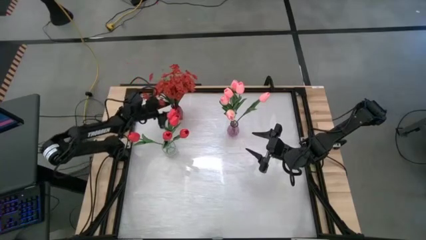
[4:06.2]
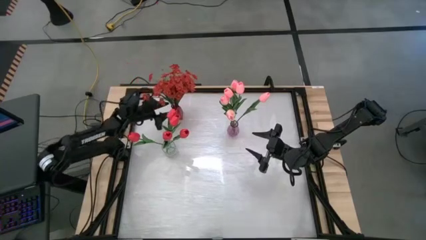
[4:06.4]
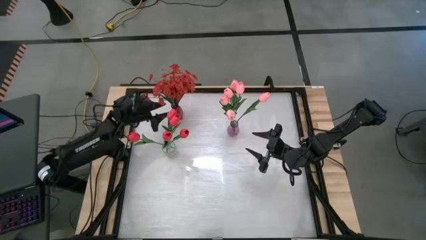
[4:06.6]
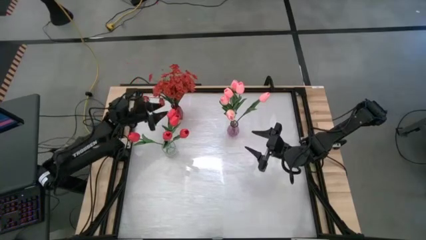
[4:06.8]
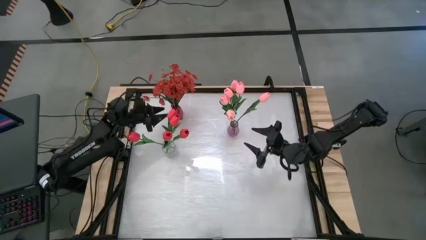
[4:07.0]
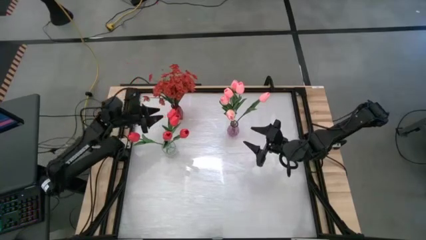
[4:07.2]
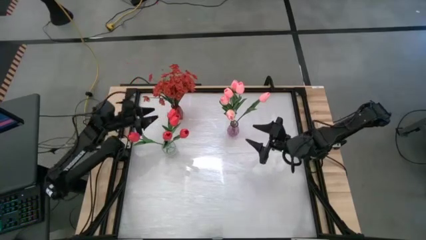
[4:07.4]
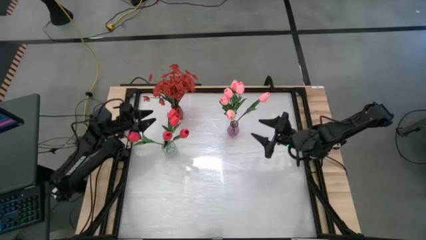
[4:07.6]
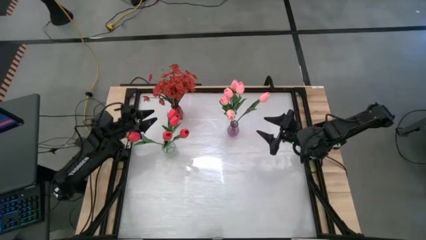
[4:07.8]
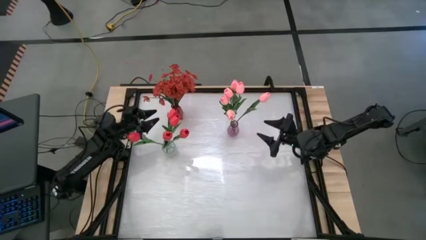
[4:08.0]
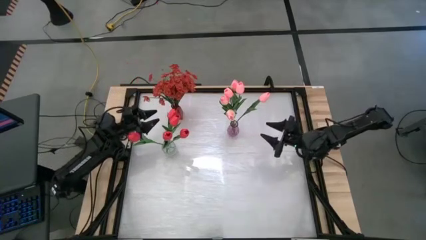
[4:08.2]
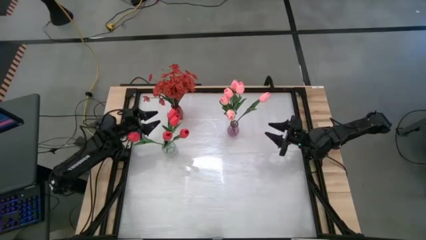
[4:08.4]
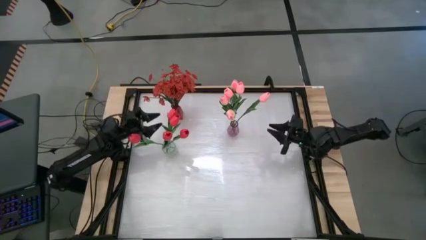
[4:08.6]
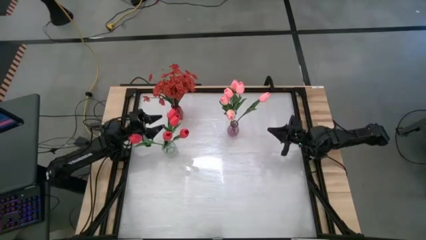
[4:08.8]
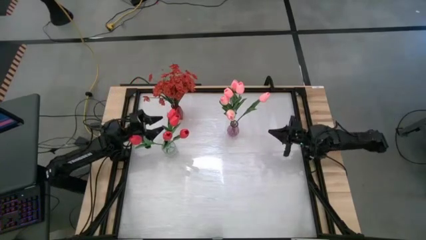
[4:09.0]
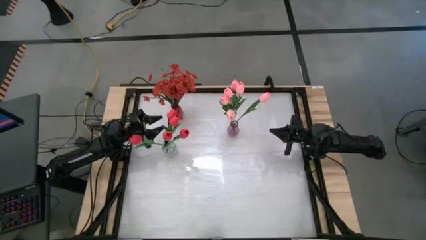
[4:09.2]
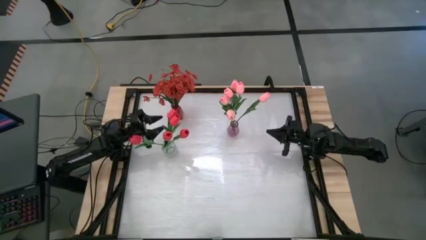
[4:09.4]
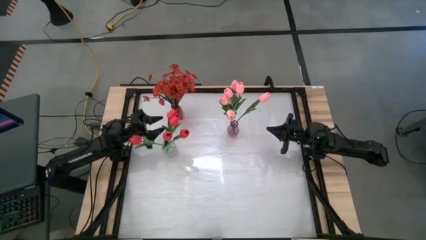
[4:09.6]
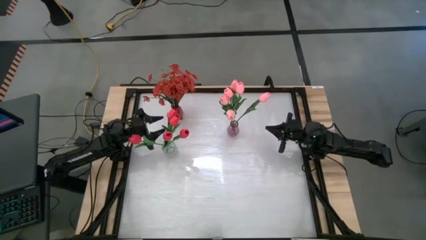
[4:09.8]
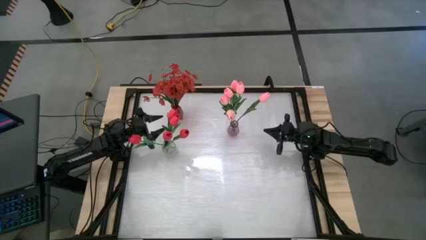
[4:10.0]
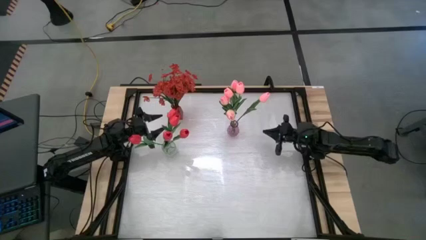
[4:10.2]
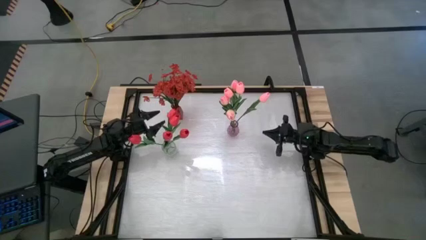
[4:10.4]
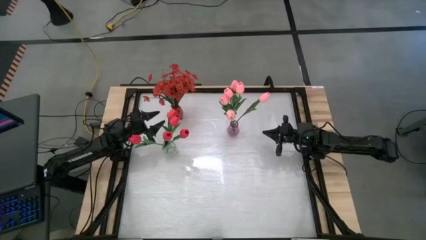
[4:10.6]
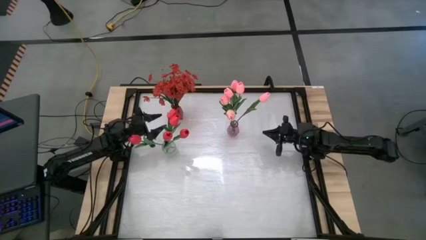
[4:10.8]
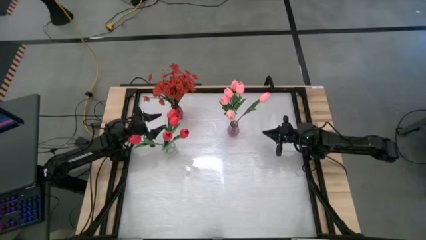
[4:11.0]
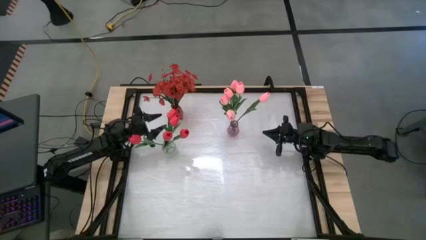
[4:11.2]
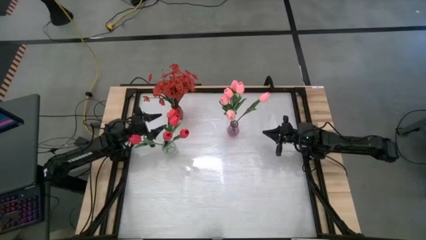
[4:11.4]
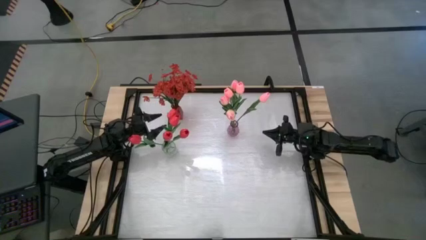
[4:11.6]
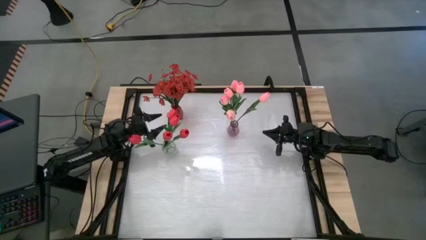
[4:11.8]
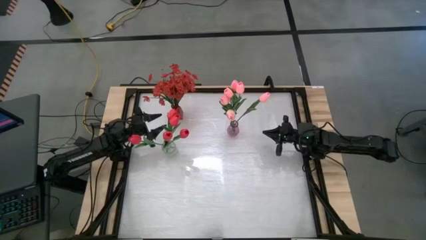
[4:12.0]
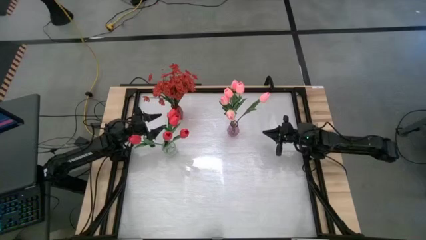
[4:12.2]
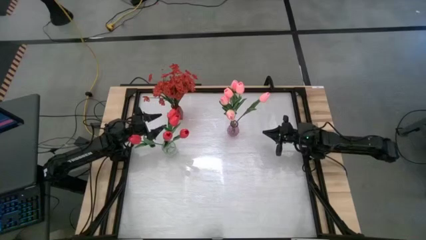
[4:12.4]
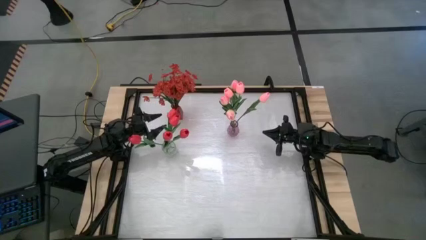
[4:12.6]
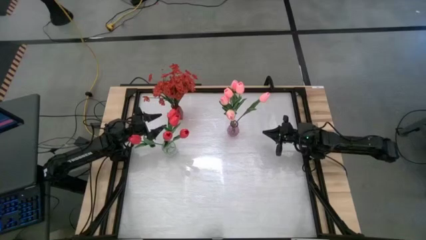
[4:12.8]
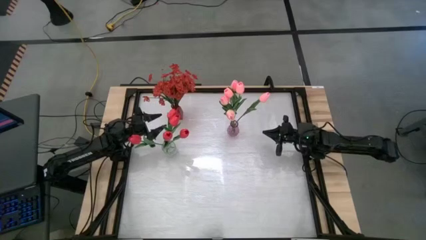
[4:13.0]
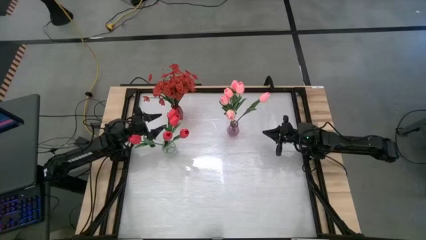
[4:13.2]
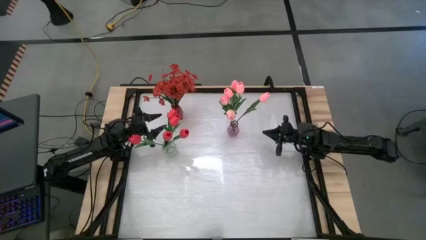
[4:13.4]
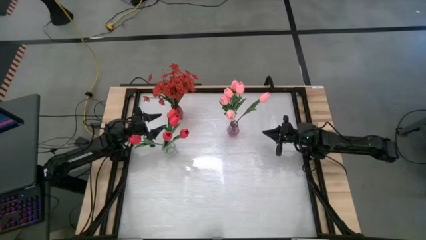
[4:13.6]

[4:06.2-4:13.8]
Task: Sort flowers into vase by color
Return to Home Position

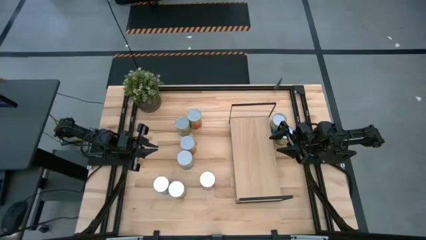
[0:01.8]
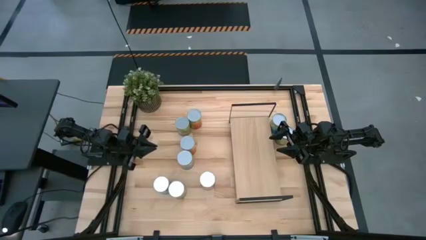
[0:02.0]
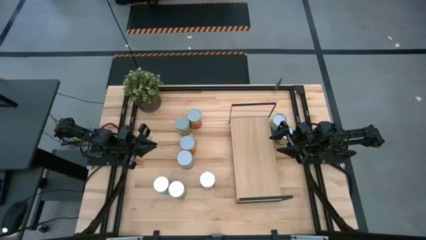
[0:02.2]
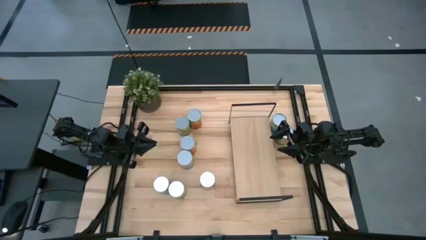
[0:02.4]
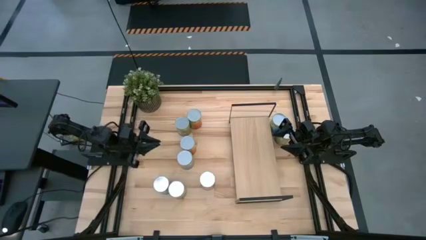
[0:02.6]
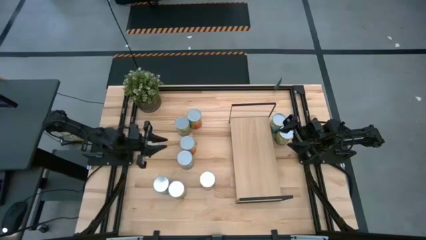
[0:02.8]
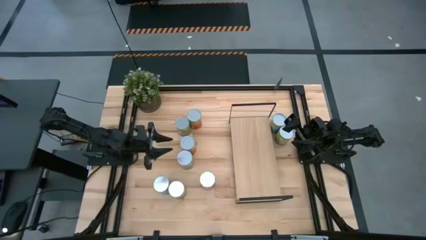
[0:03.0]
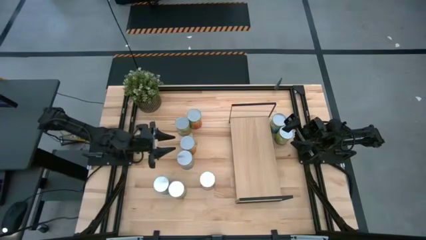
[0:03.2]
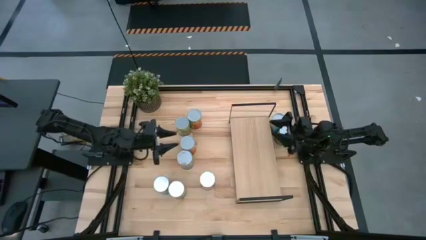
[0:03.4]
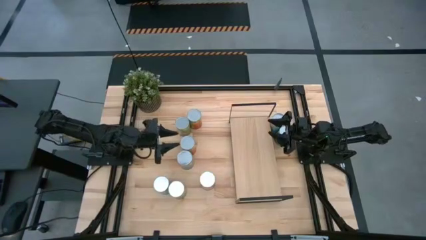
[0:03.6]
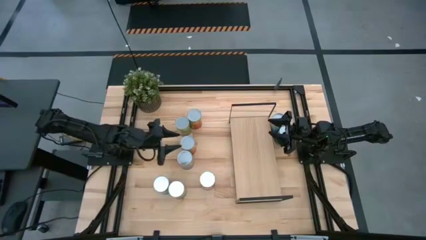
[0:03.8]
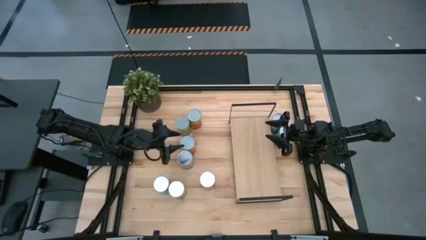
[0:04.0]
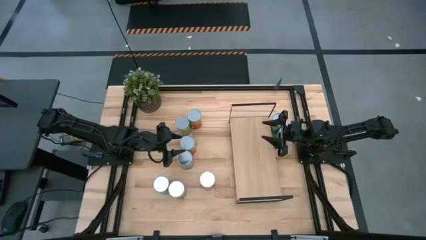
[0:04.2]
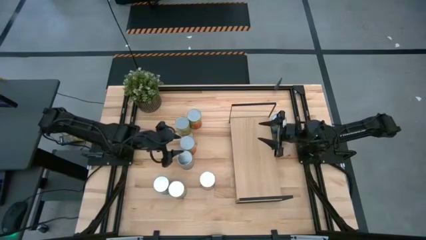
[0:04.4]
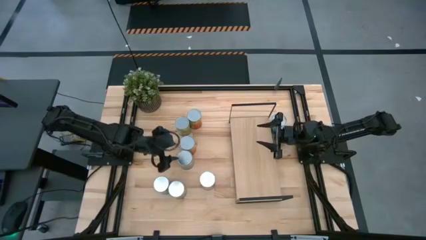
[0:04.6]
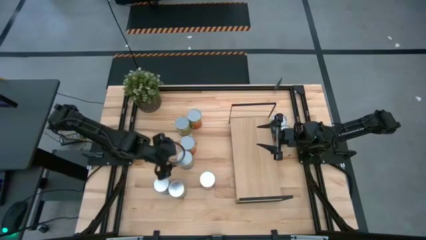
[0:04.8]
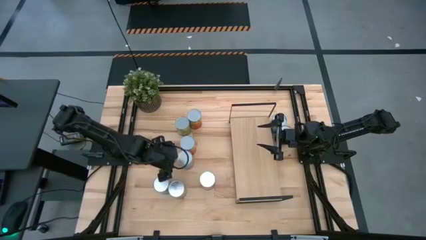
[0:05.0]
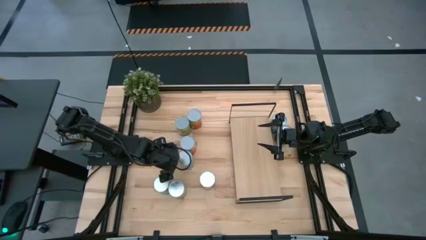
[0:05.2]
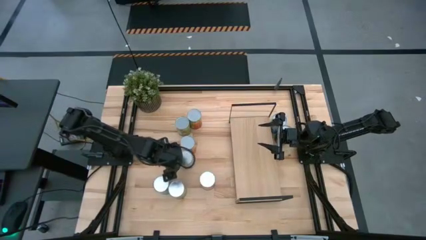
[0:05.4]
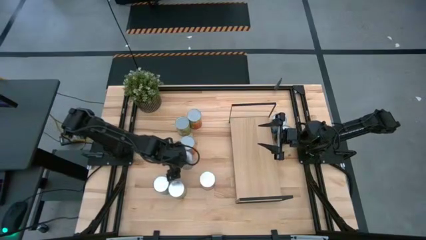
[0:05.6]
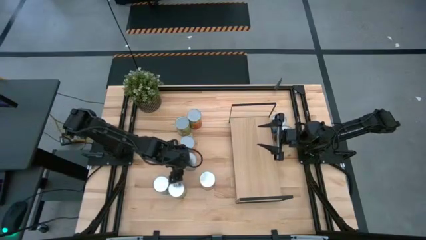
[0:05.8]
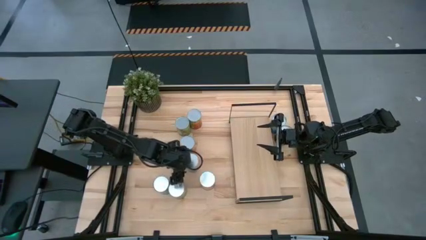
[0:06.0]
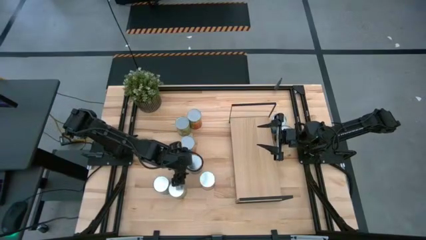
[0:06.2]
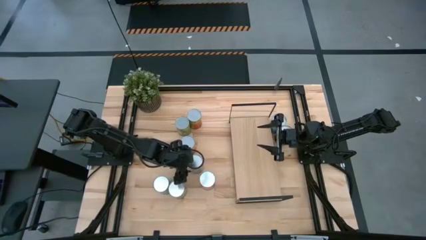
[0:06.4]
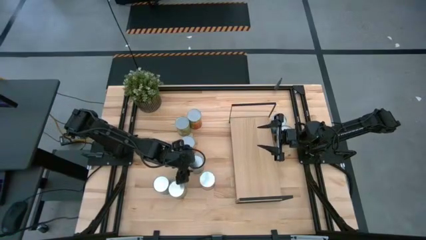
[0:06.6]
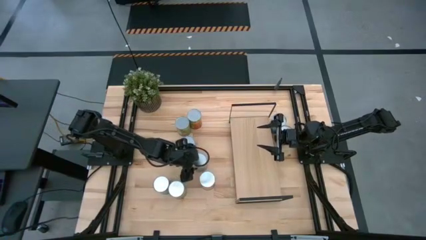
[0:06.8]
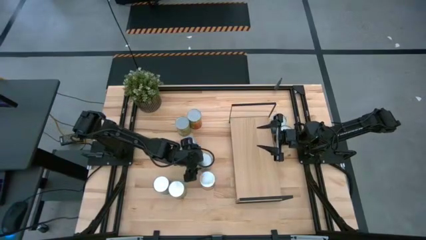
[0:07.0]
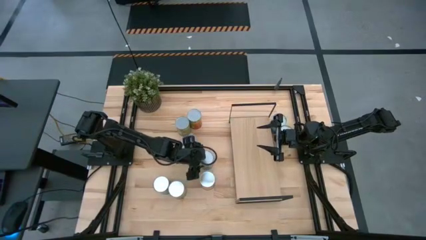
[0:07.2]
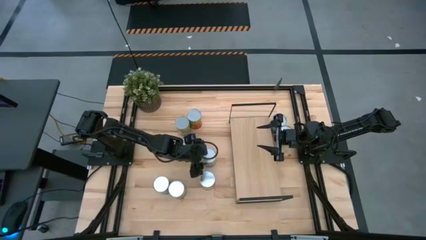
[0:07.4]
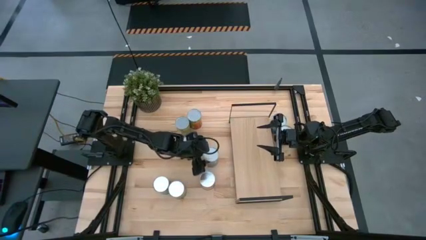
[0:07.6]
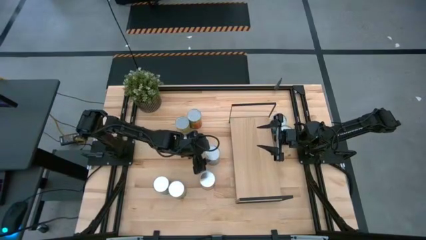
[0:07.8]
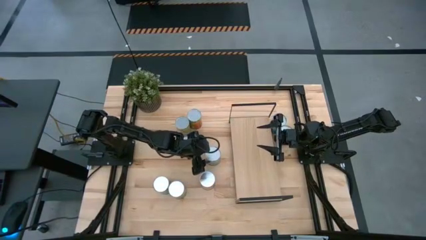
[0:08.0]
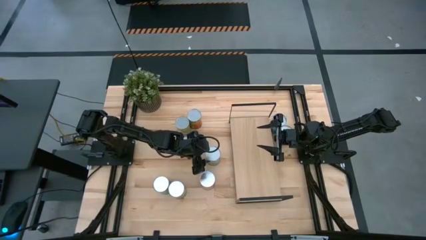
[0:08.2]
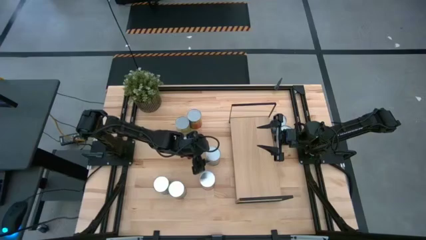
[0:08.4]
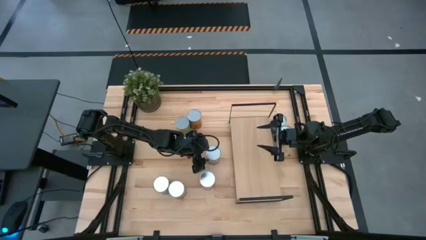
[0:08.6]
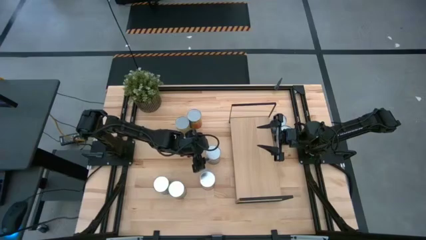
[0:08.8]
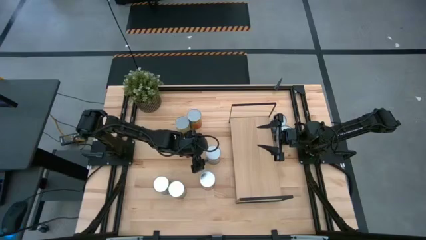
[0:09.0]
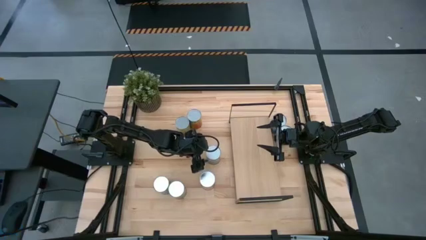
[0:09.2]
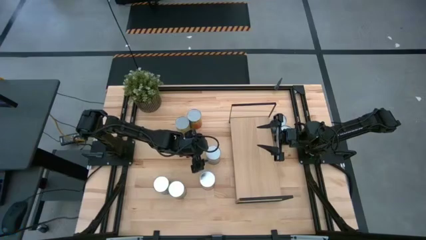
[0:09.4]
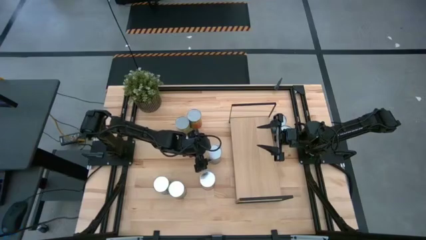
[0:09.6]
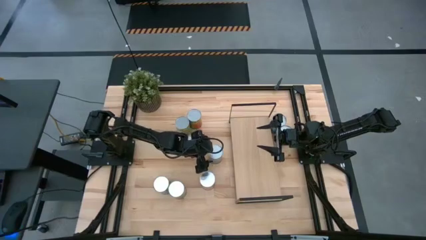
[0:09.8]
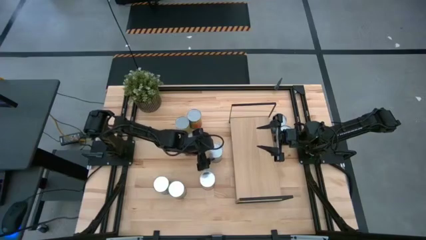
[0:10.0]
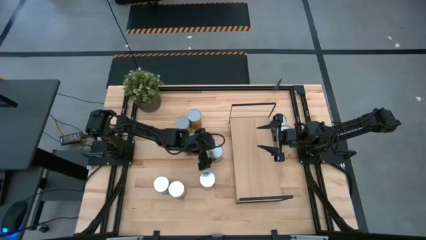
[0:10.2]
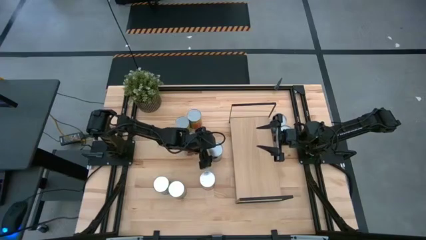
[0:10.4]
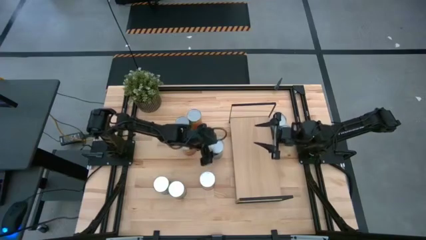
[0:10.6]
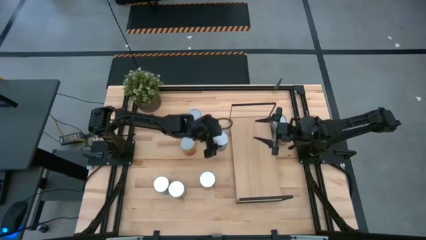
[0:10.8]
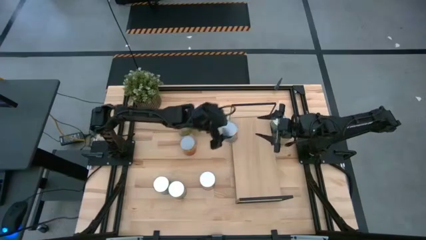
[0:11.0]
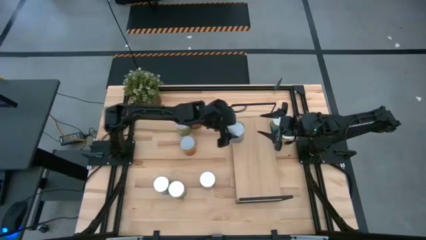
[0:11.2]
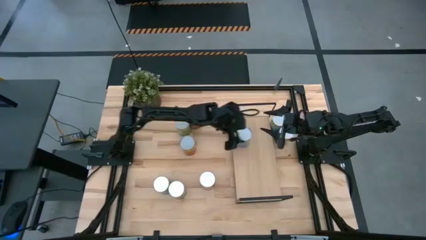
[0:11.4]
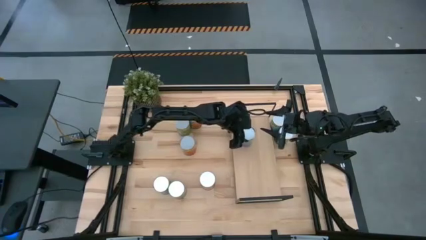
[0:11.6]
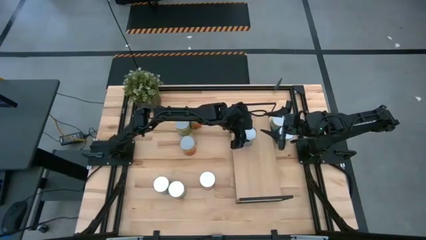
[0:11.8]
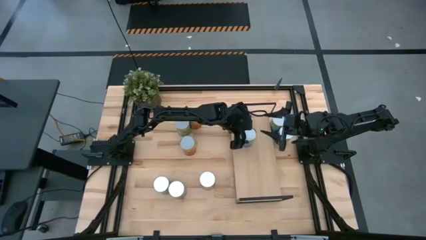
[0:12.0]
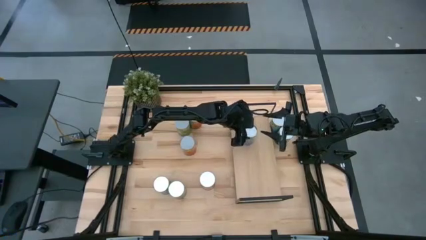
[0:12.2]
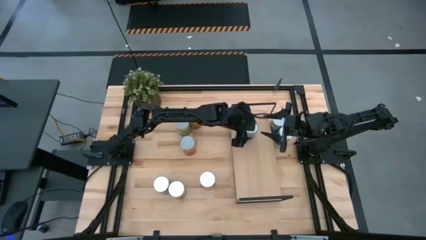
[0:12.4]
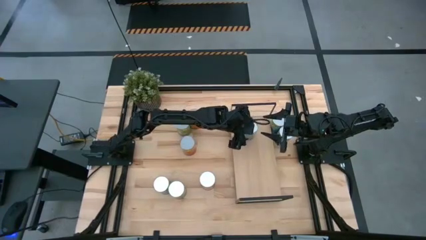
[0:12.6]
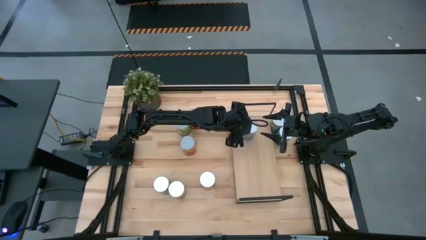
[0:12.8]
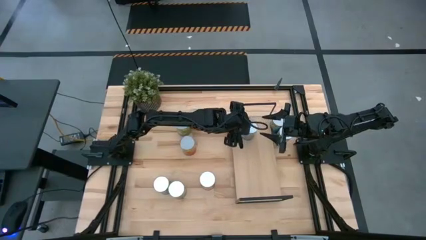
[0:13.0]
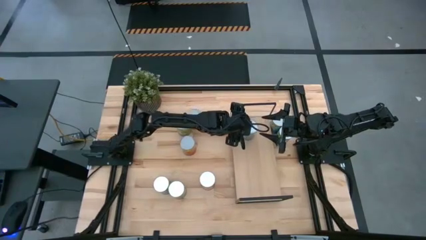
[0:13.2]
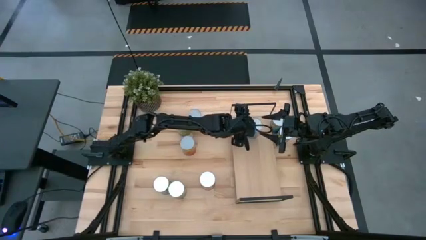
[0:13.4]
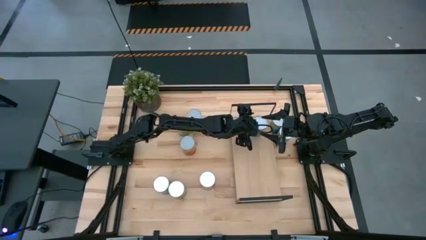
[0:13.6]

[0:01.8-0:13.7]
Task: Pick and place cans onto a shelf
Put the canned peaches on the shelf
